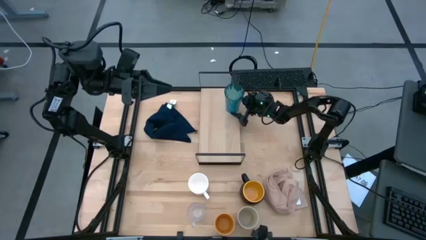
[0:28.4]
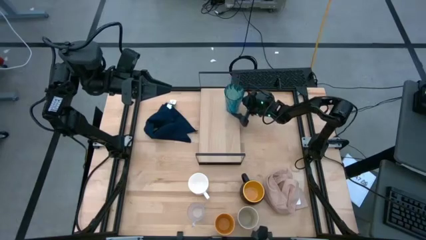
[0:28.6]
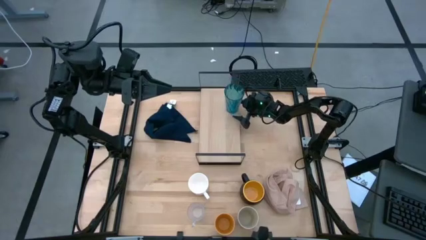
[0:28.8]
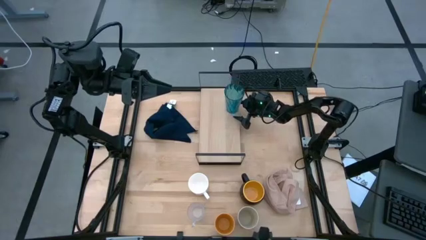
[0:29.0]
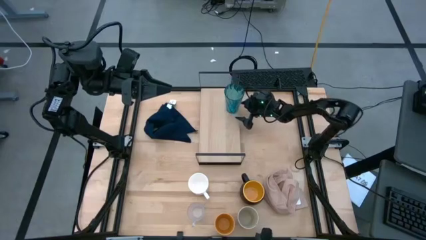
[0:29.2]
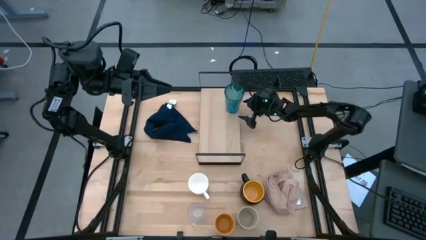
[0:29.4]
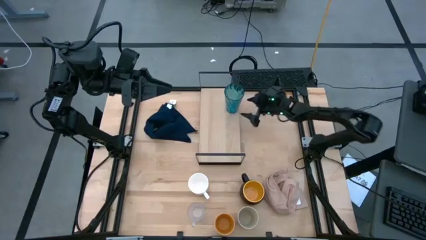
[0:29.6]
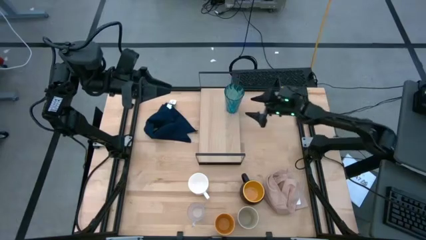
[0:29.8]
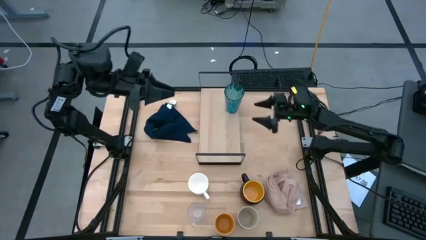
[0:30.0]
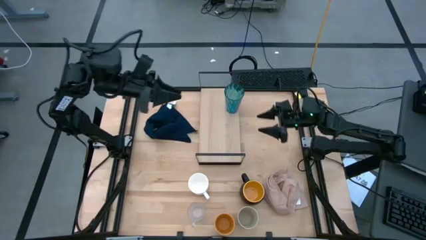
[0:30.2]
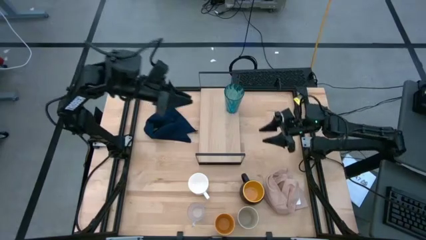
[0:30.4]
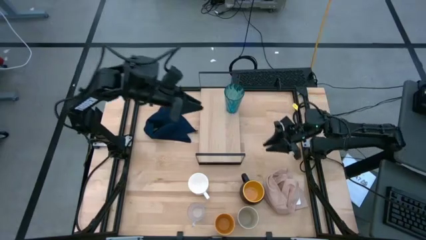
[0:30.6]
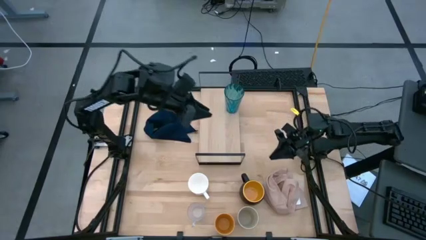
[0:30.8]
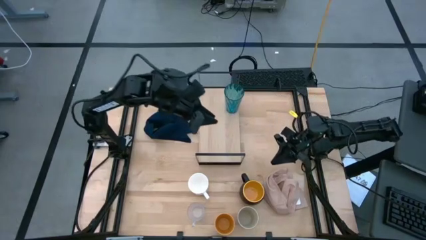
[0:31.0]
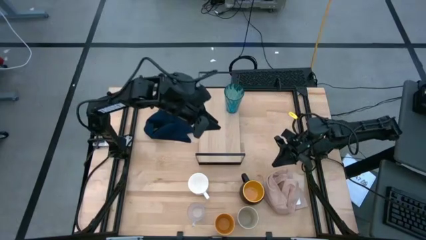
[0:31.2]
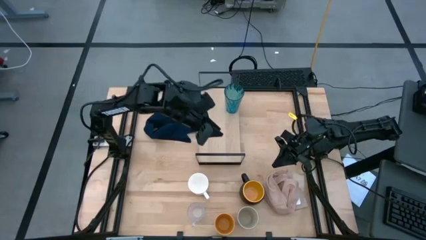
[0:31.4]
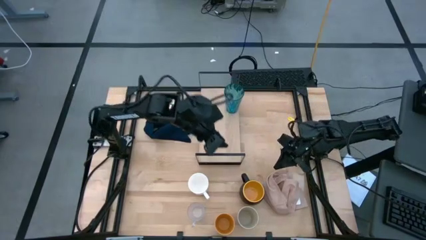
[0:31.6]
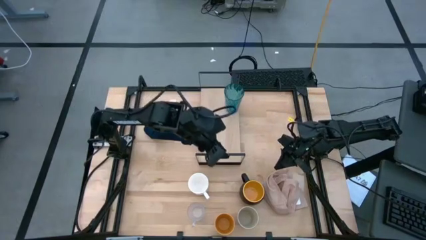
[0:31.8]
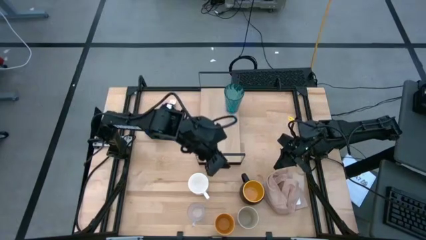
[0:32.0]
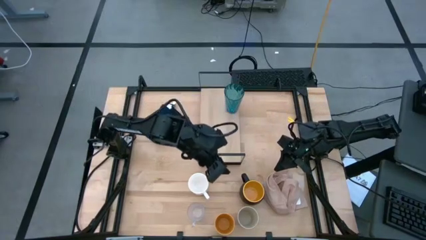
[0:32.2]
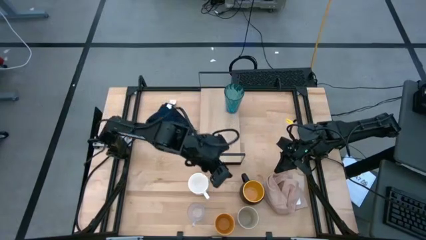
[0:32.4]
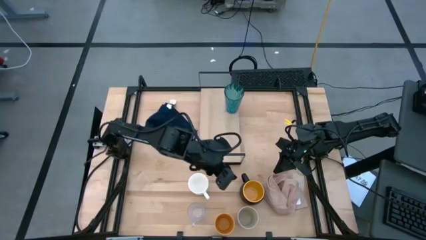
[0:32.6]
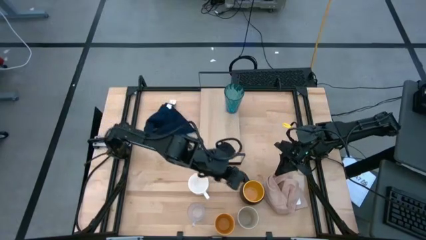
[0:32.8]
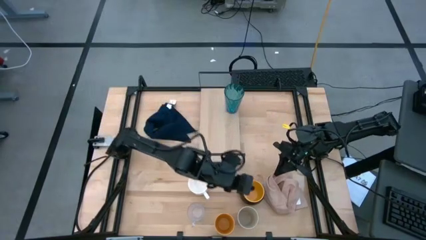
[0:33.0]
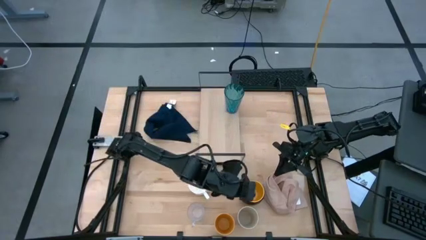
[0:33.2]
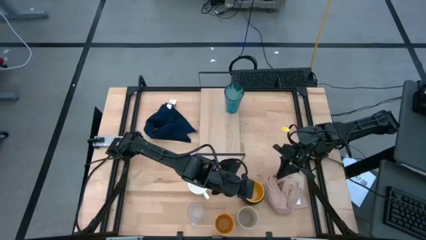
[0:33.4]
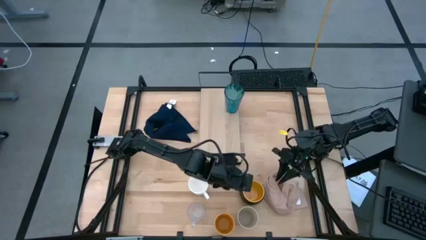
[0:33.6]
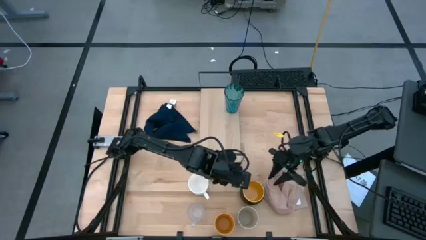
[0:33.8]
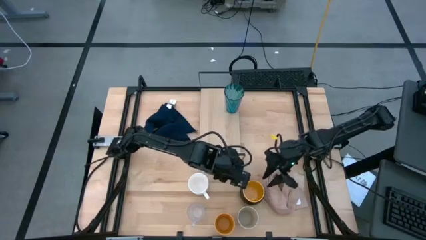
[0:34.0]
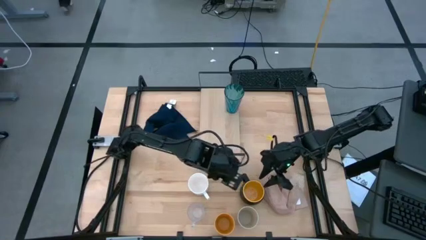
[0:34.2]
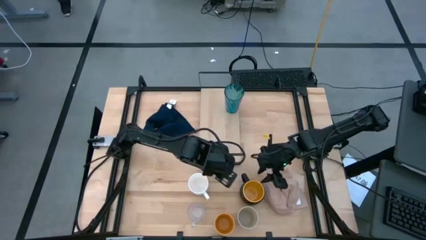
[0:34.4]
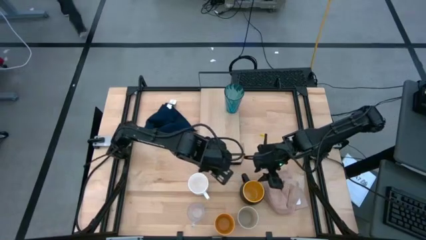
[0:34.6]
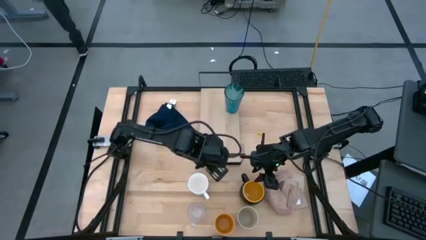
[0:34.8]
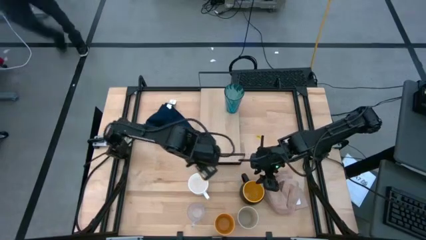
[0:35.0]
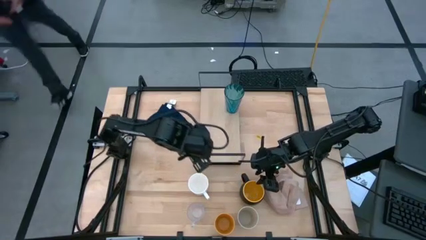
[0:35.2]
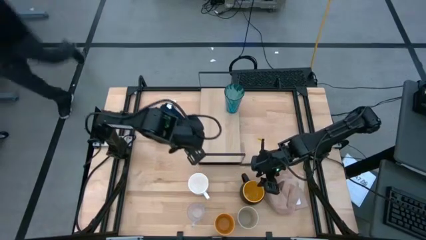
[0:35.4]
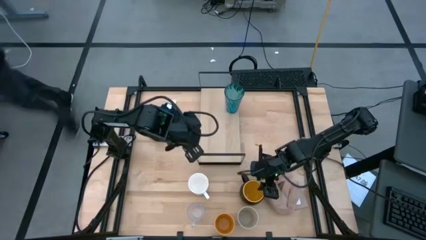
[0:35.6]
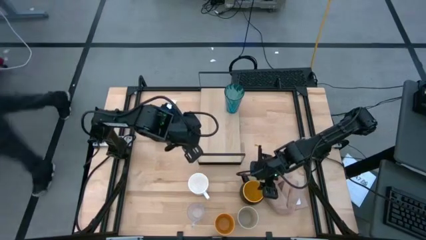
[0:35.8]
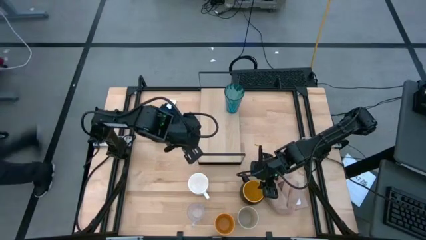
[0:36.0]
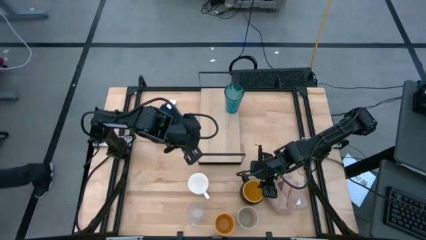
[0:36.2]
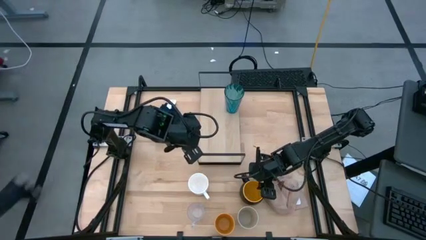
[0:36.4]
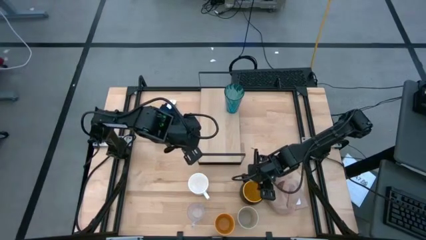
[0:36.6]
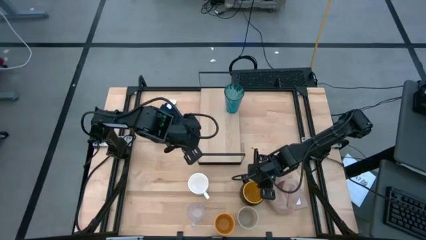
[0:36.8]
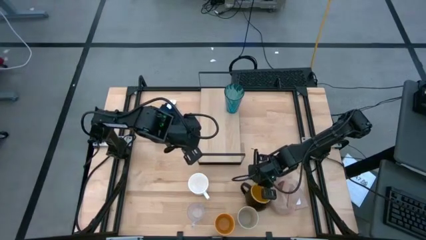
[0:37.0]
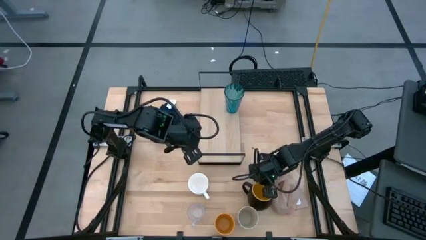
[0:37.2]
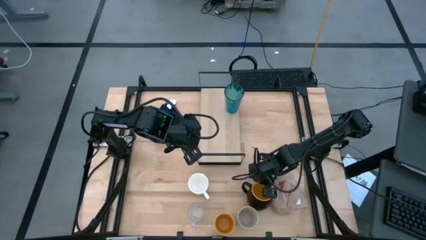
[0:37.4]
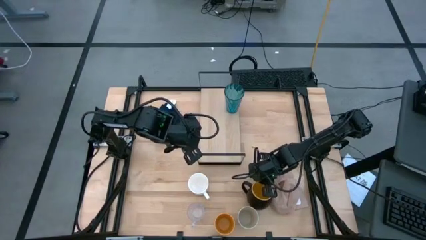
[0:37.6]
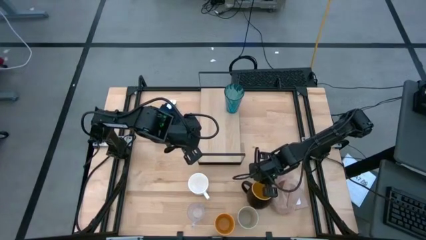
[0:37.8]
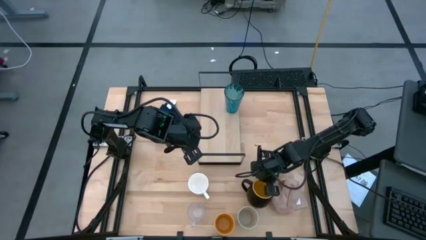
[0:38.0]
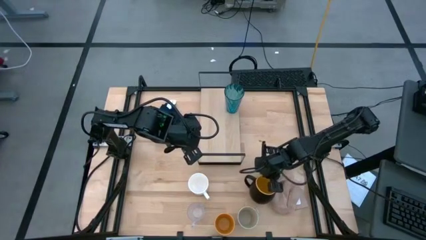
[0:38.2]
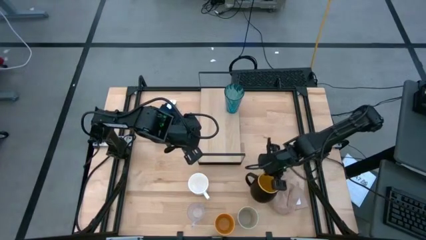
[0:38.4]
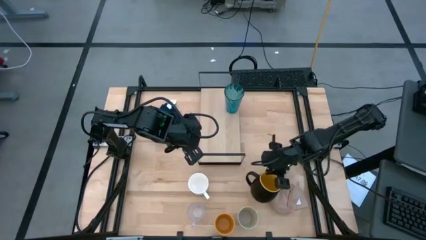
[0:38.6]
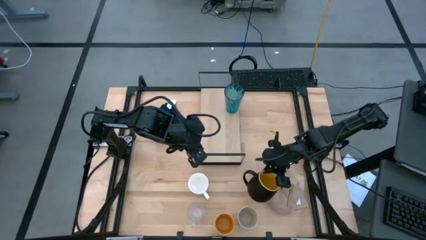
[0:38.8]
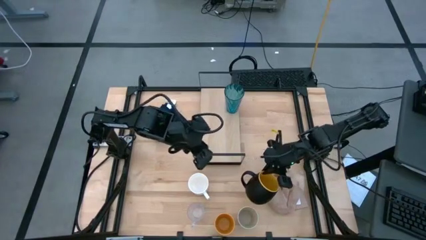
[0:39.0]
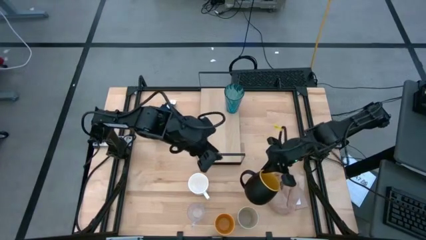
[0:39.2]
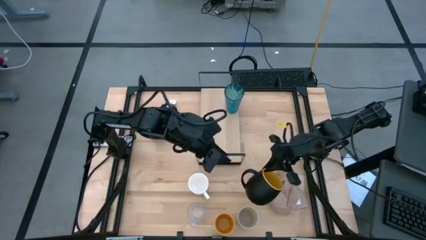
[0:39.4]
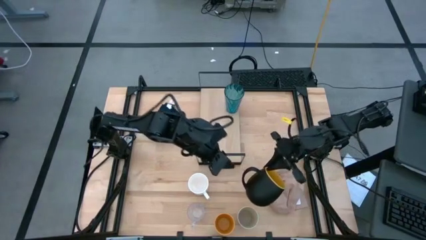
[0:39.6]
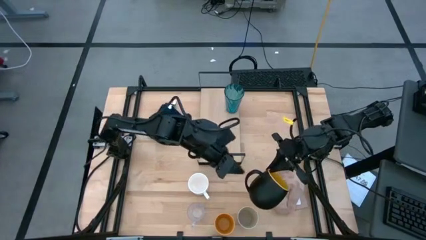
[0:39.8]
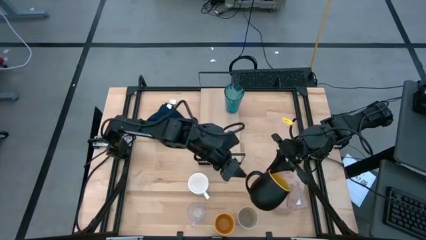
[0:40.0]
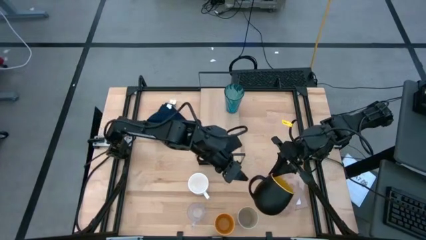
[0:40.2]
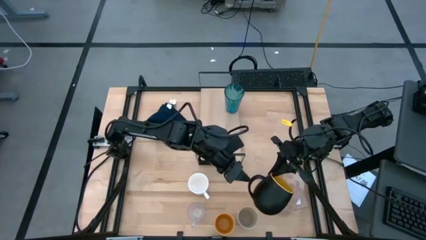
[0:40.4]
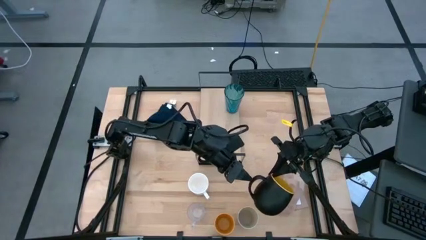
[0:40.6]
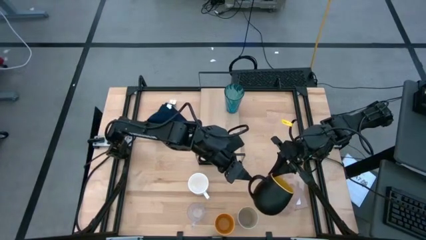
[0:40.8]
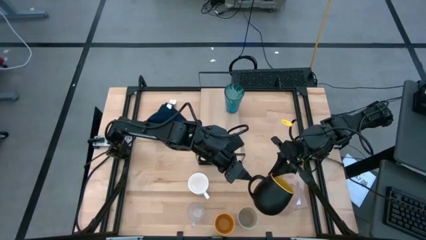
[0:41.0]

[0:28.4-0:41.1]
Task: Stack small to large cups/mugs on shelf
Put the black mug on the shelf

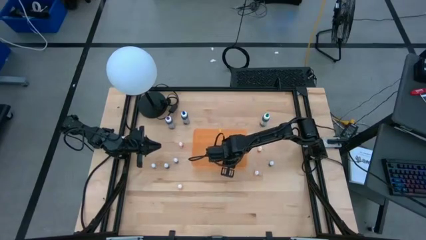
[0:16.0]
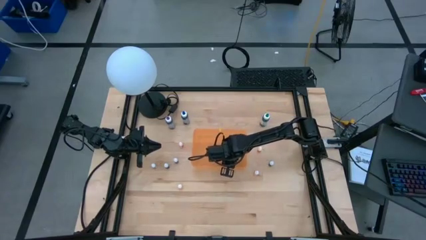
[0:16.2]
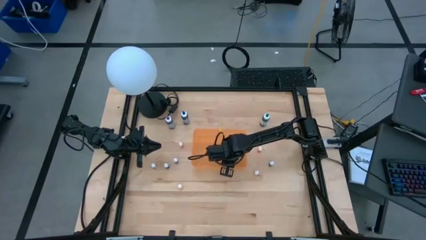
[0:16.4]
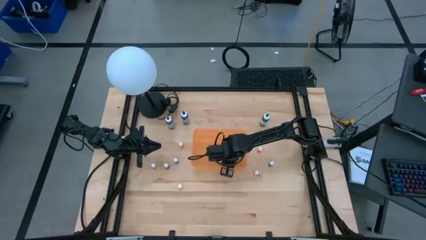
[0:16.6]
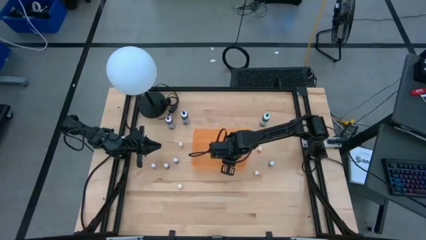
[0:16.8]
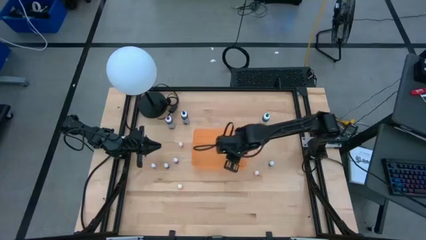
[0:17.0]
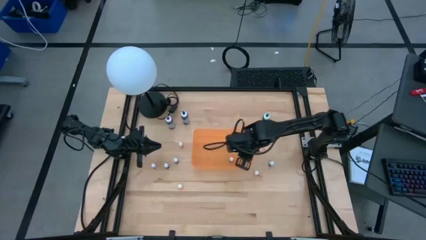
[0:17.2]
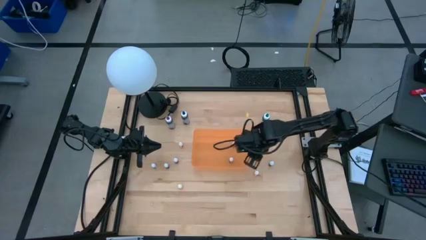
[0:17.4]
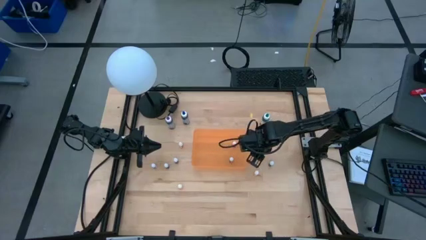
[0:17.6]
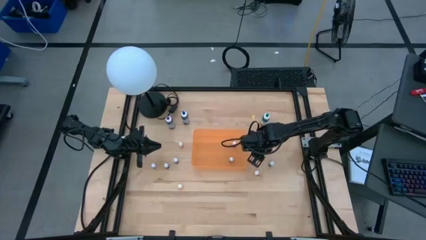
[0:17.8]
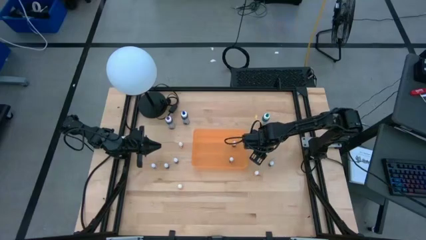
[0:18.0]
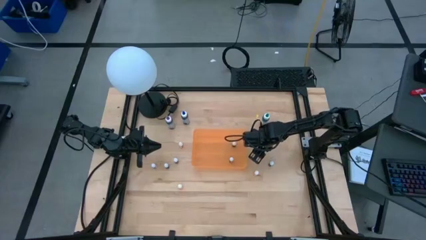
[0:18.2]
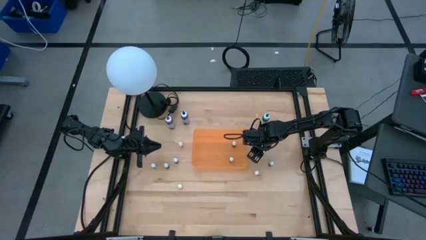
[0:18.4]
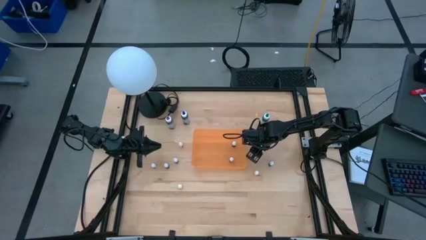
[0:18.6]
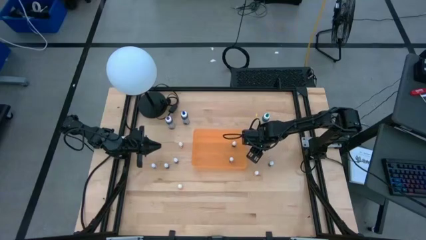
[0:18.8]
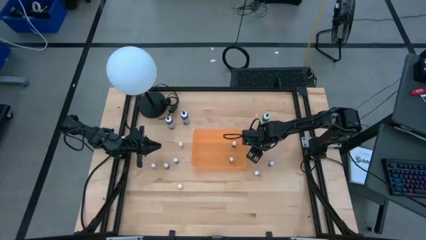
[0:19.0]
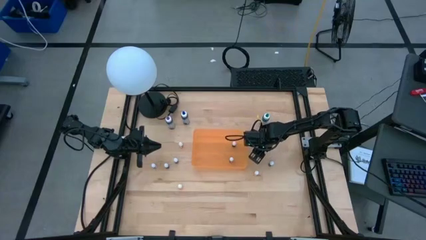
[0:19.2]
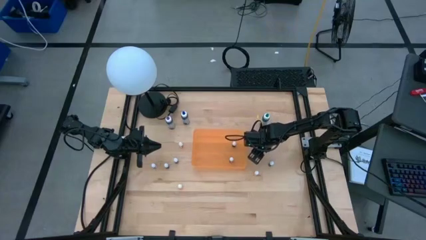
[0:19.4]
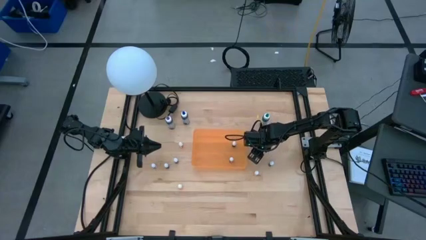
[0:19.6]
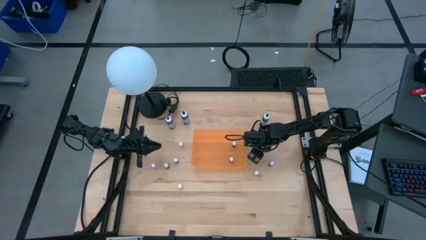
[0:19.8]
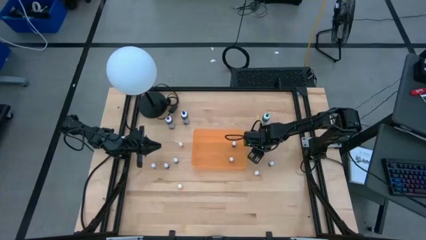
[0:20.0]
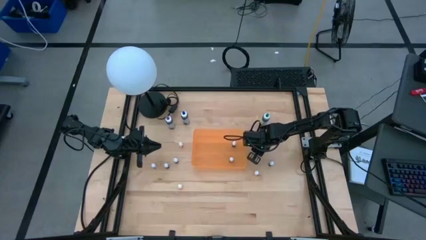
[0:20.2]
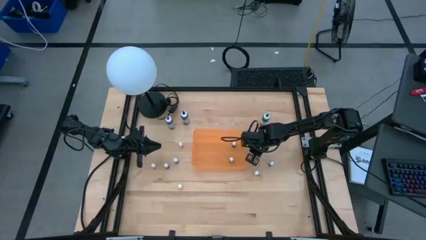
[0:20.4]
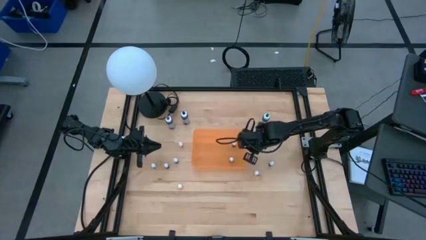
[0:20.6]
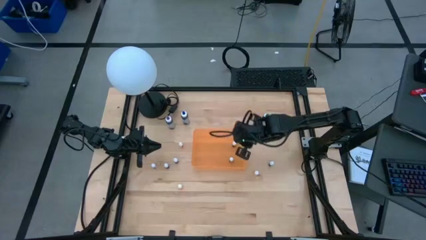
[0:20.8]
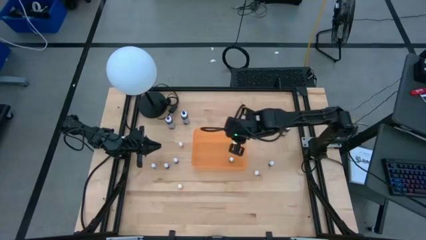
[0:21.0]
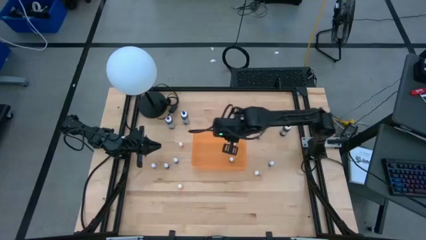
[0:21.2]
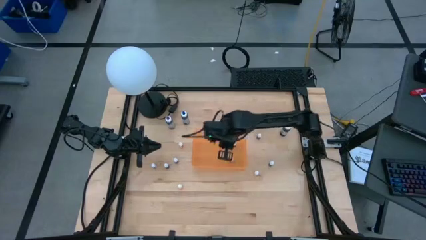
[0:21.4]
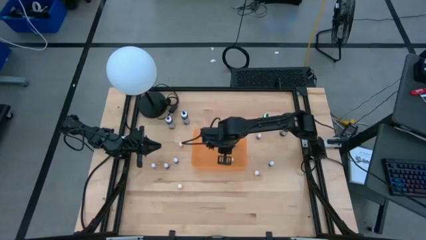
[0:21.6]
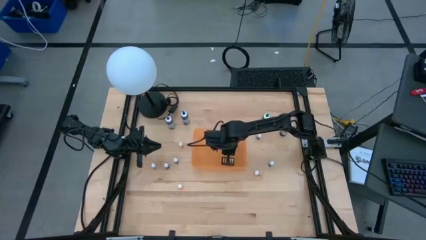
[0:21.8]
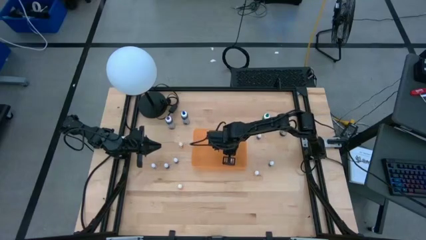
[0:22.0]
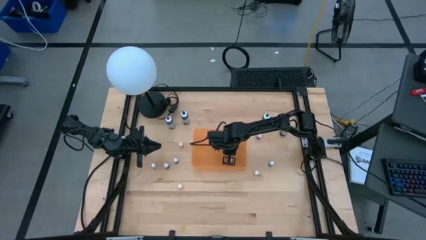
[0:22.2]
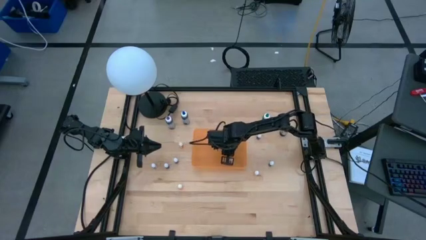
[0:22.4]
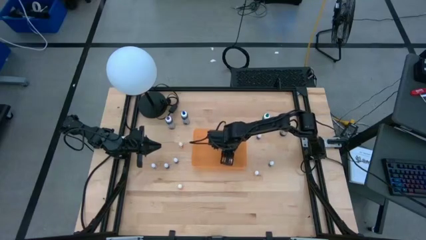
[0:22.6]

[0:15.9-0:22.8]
Task: Pick & Place food coloring
Put the small orange food coloring bottle into the orange bin
